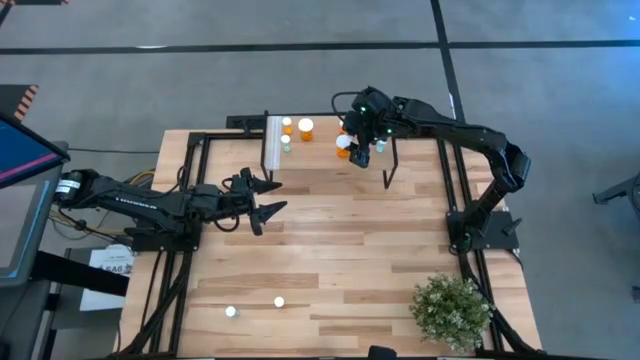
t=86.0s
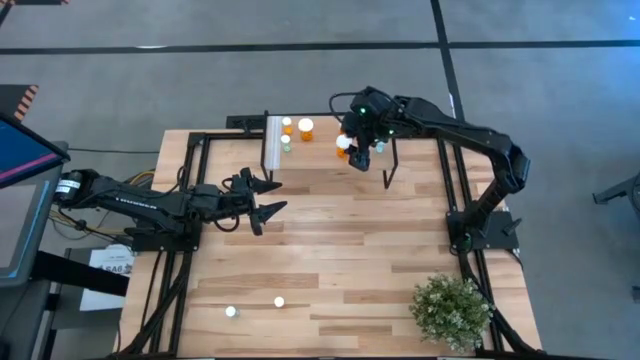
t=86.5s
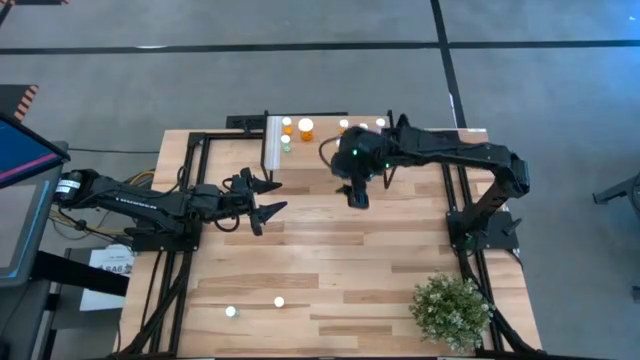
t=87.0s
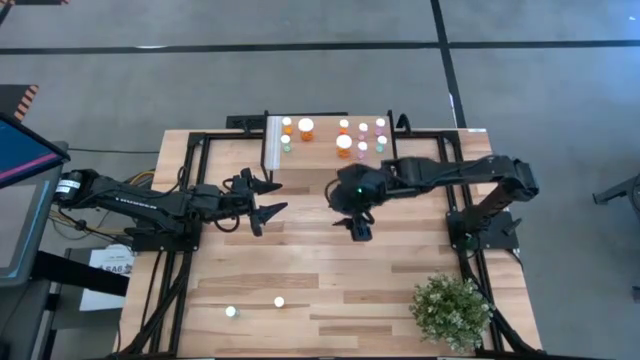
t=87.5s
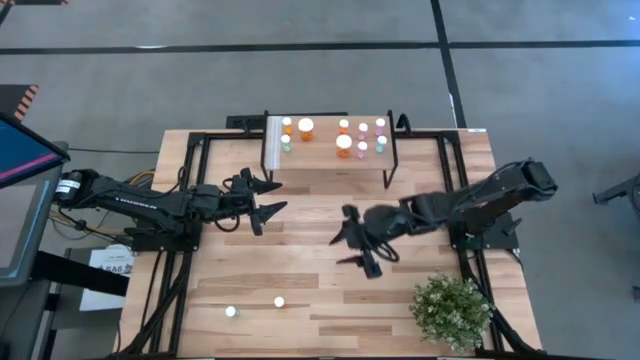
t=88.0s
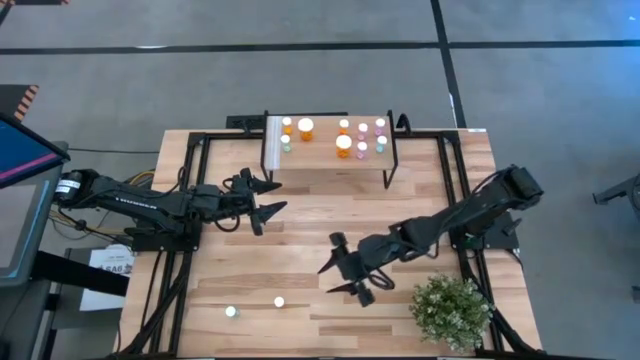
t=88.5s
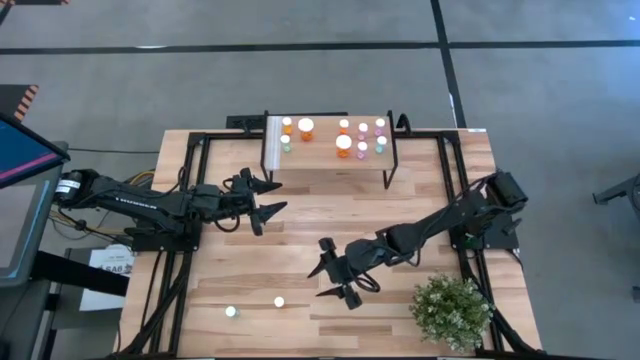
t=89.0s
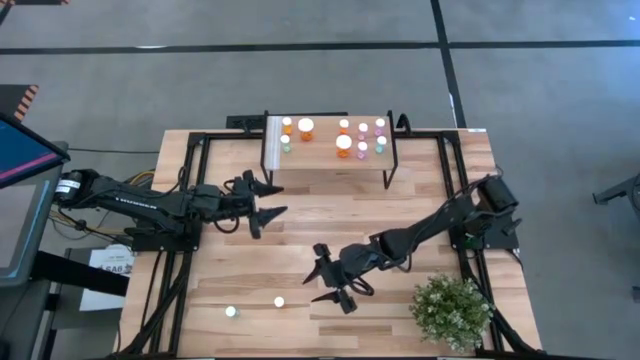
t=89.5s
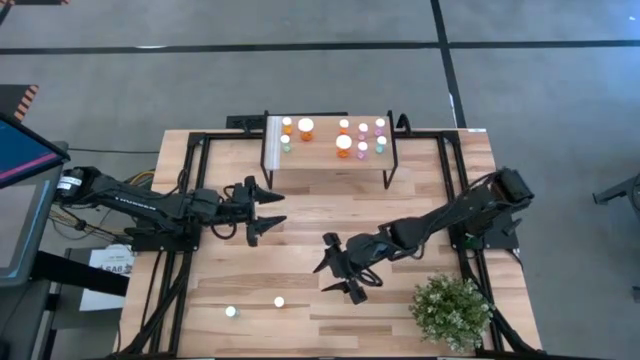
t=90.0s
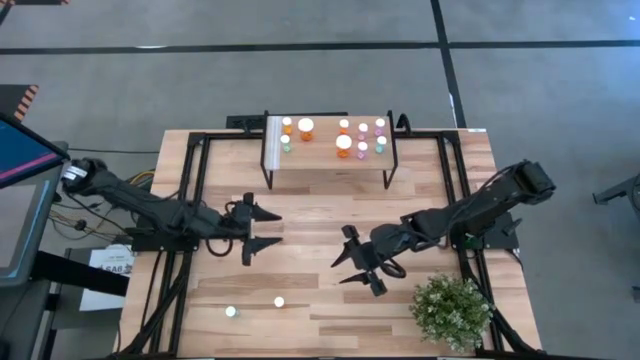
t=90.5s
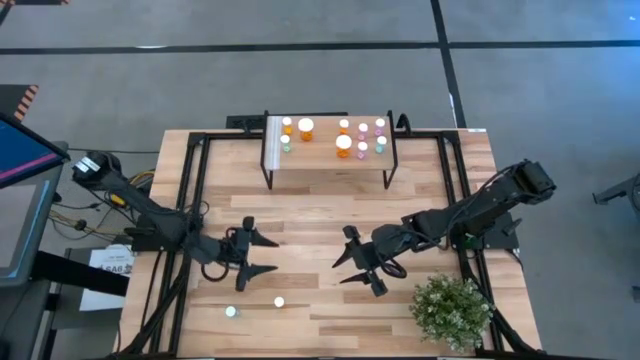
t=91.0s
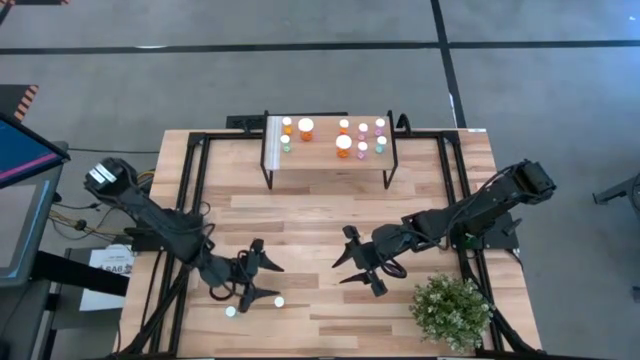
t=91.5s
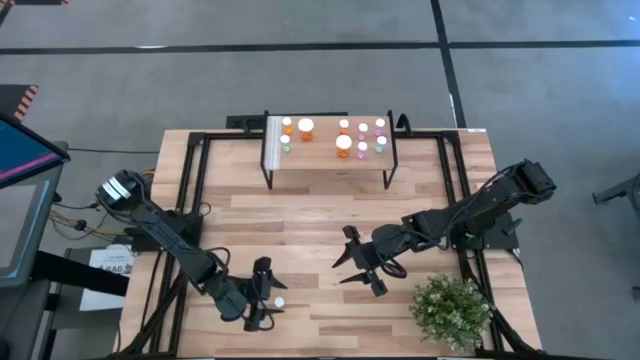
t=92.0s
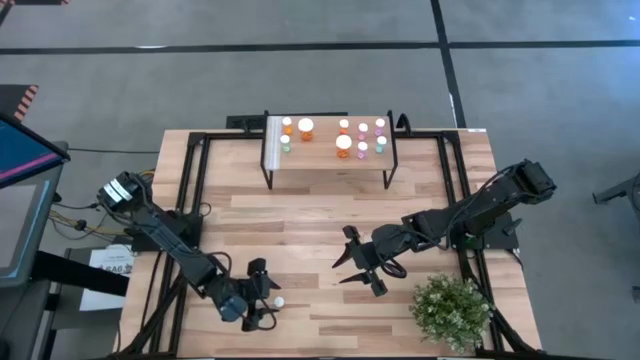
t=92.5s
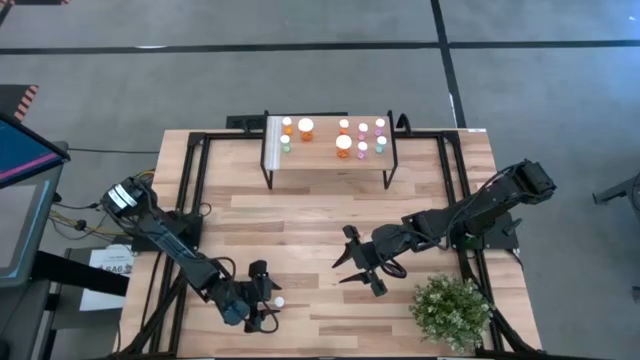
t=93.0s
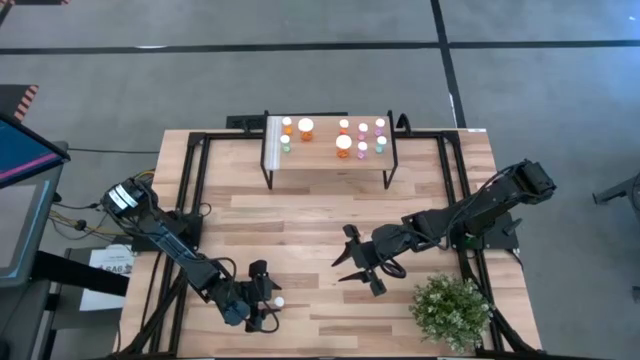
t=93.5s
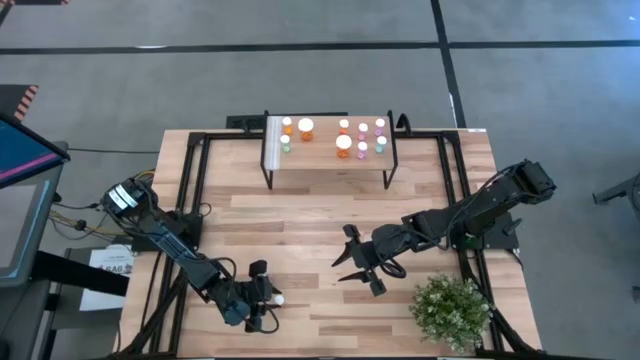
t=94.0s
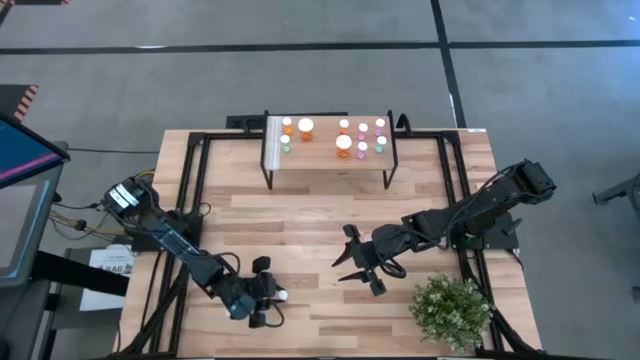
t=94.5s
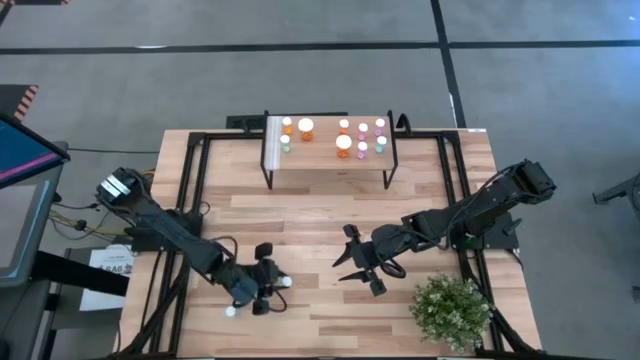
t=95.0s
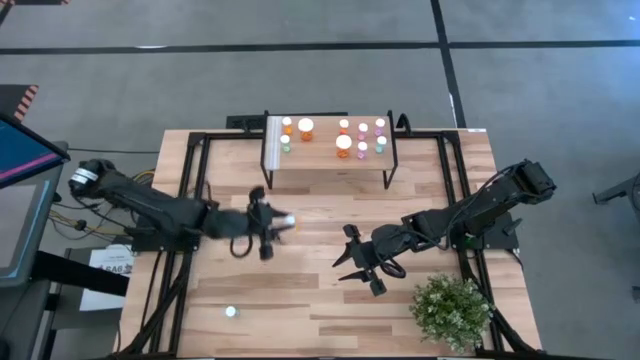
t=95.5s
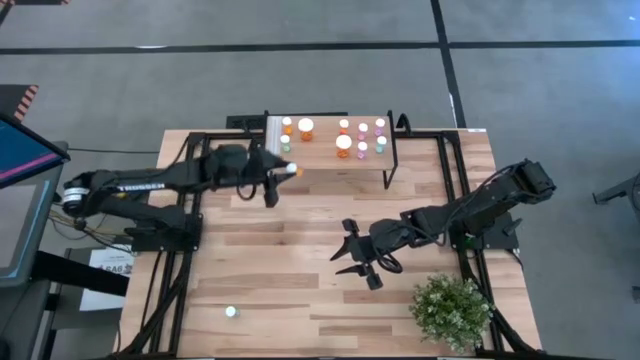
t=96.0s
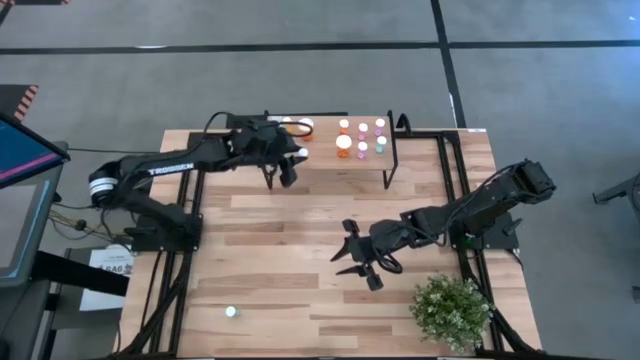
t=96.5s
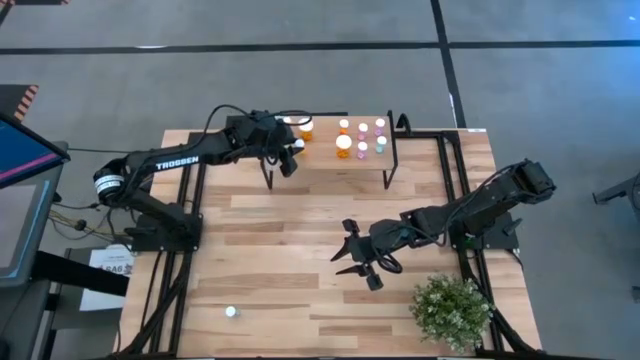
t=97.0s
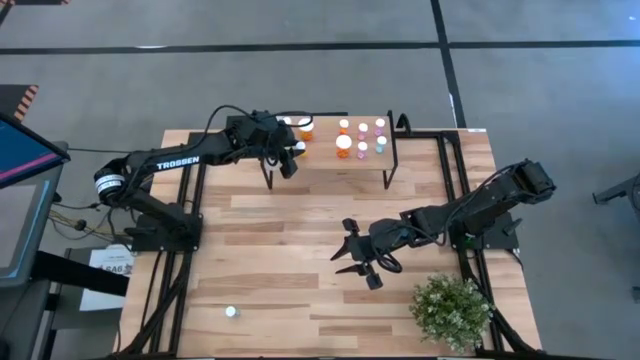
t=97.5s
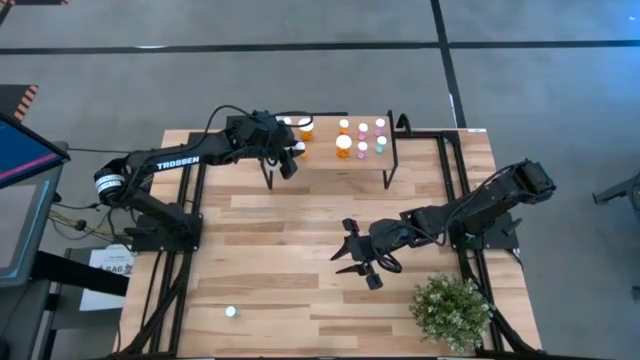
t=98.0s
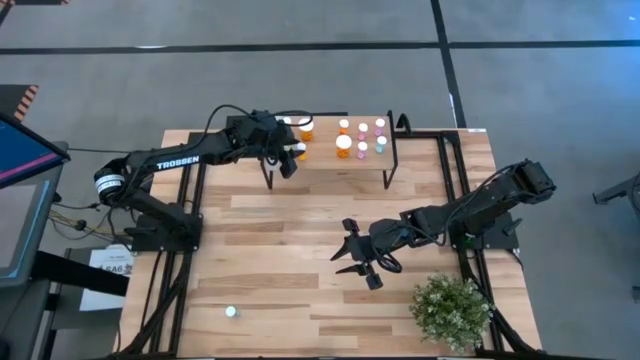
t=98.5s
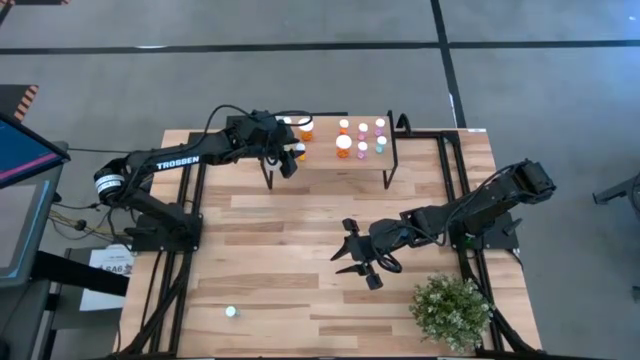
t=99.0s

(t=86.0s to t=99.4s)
Task: Pick and place medicine bottles onto shelf by color
Put the small orange pill bottle on the shelf

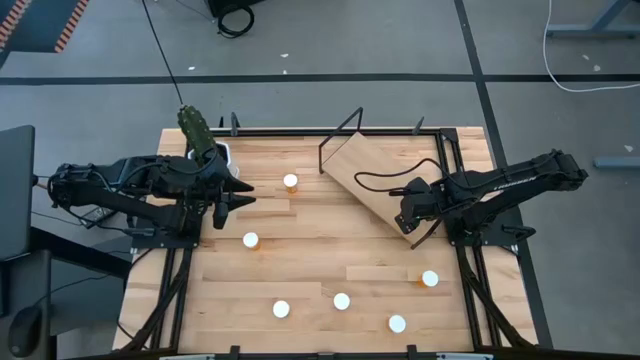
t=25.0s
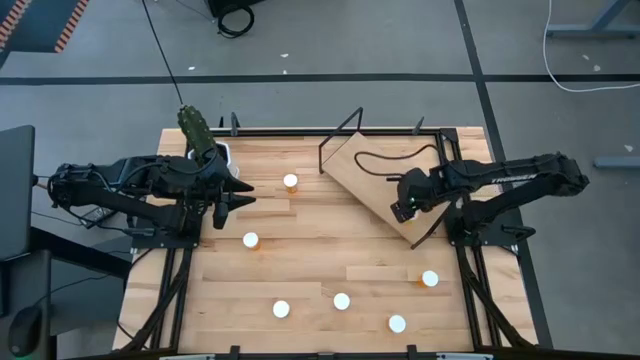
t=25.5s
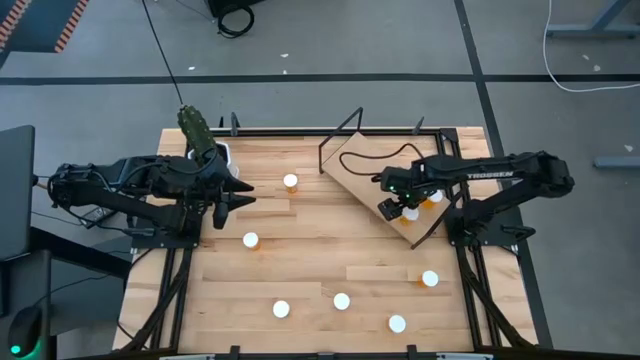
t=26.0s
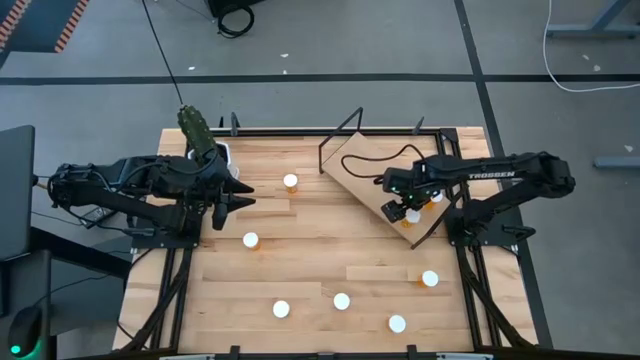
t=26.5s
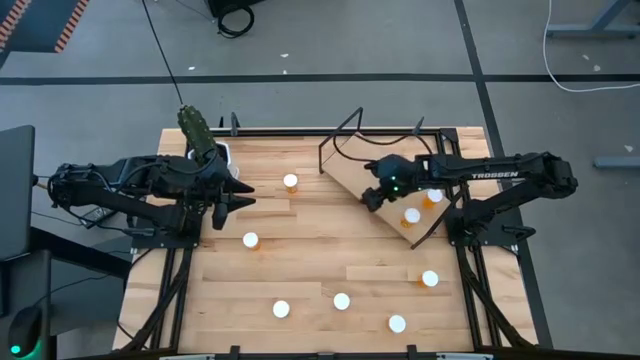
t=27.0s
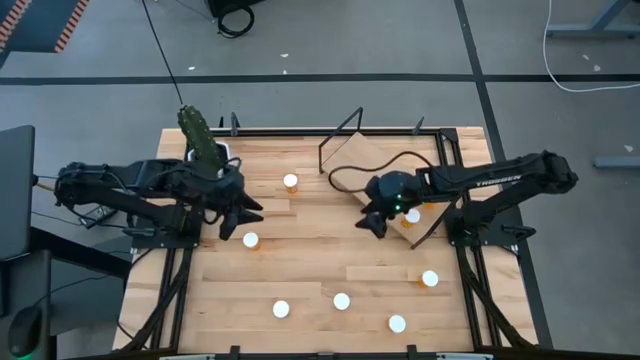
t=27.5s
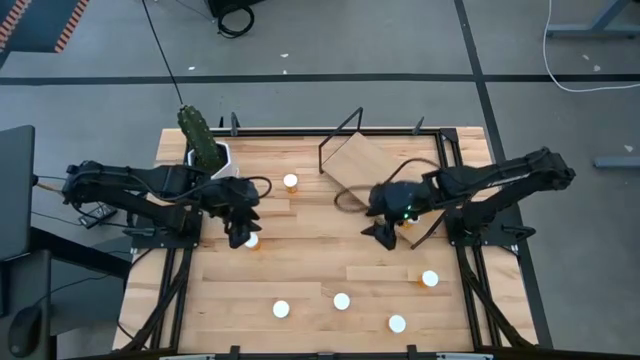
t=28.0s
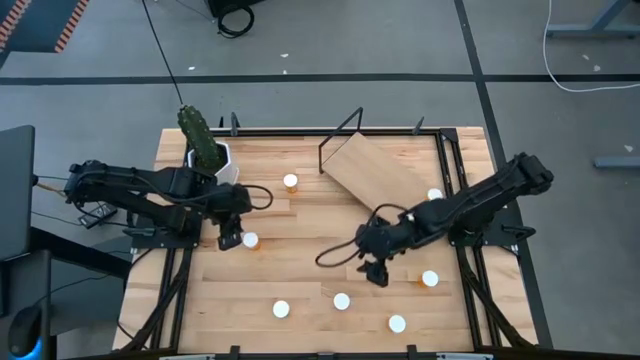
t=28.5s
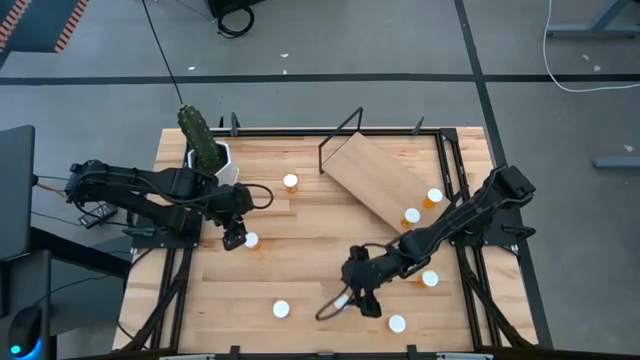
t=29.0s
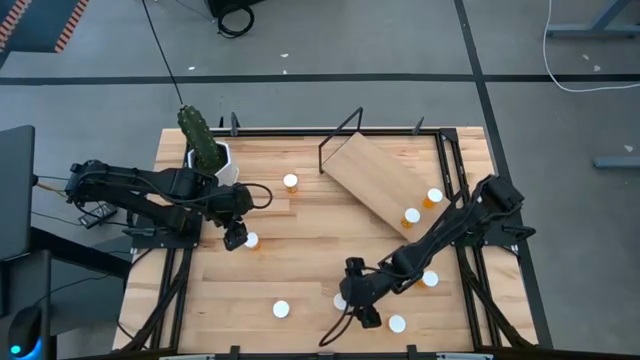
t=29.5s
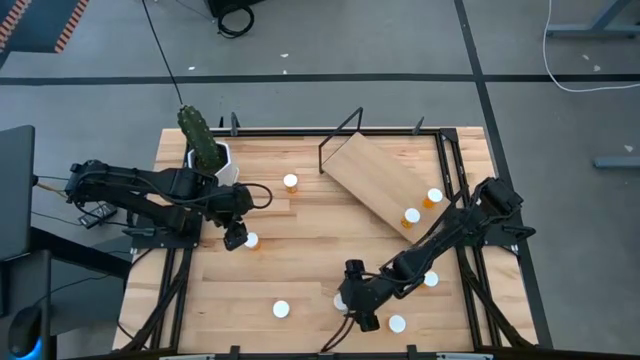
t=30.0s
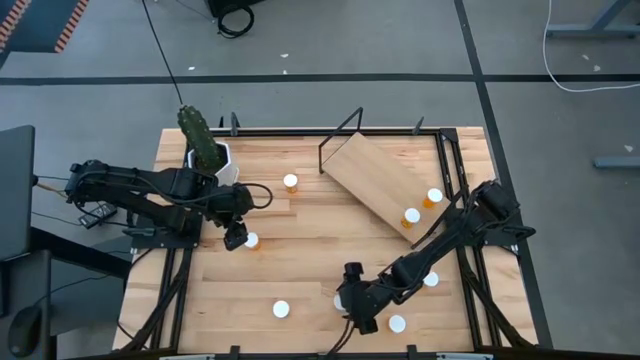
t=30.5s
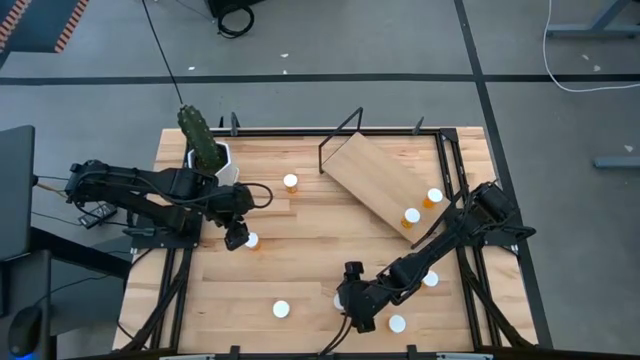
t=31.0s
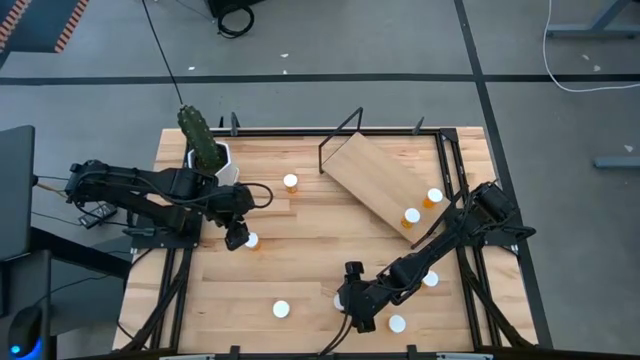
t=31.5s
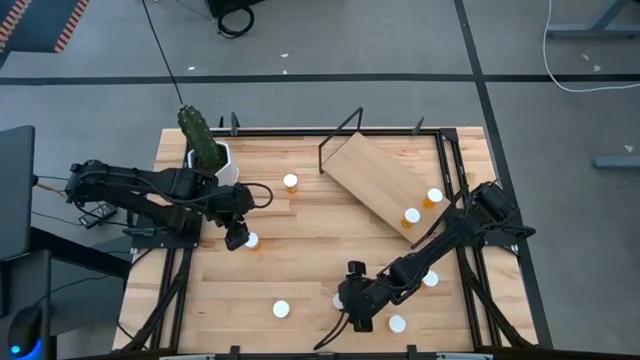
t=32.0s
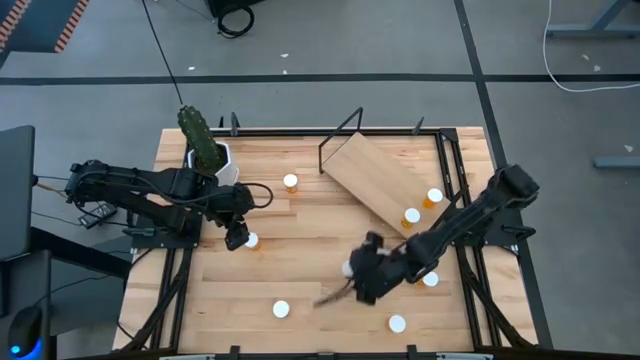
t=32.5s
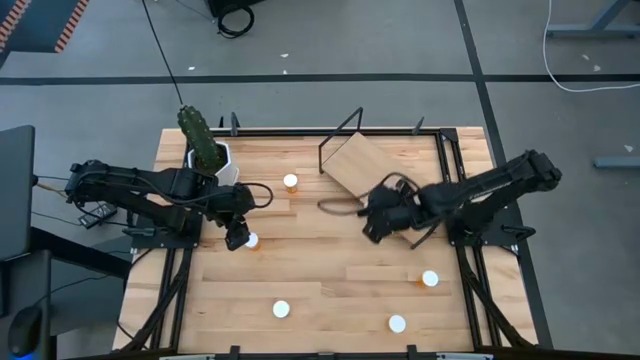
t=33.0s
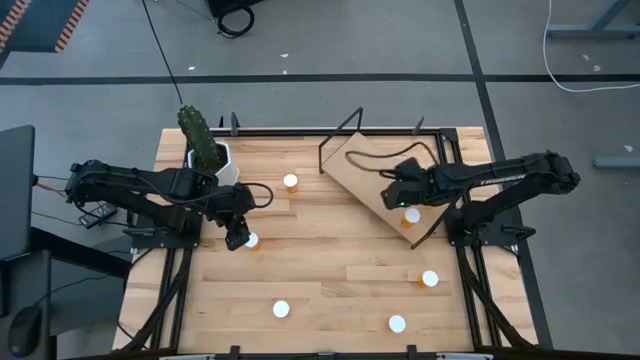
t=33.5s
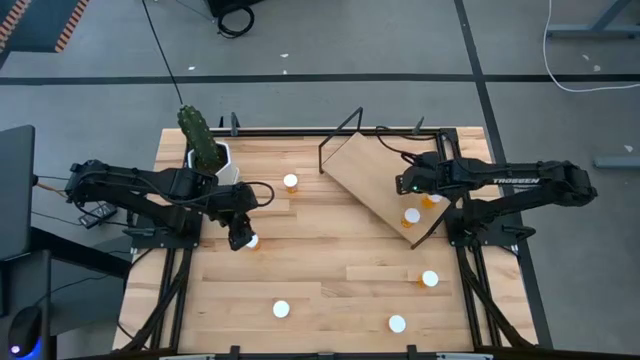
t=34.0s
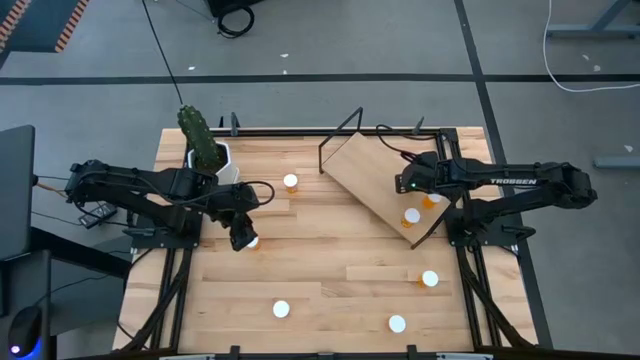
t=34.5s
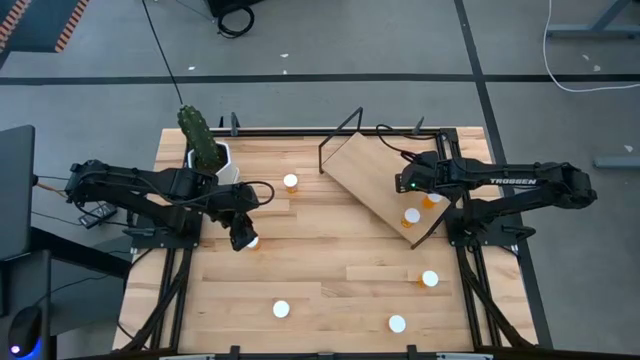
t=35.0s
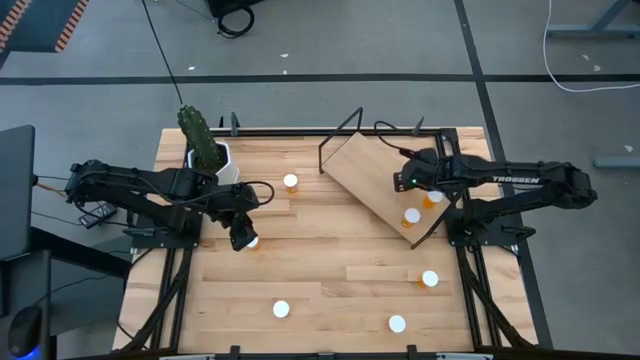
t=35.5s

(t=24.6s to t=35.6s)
Task: Pick and place medicine bottles onto shelf by color
Put the orange pill bottle to the middle right on the shelf
